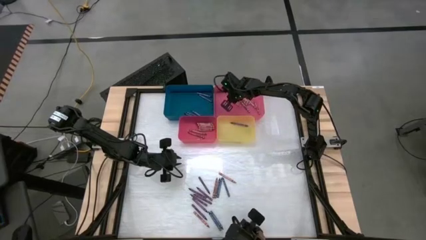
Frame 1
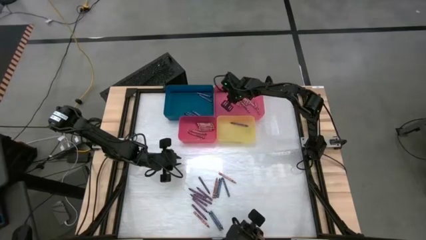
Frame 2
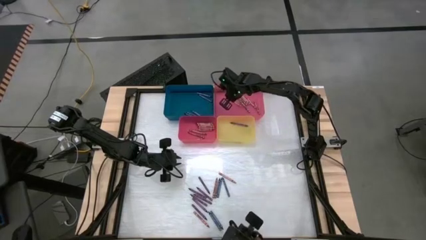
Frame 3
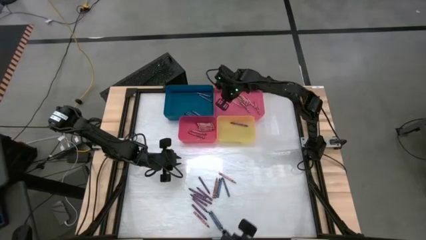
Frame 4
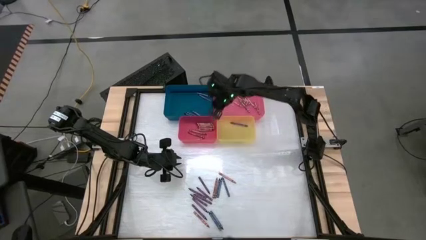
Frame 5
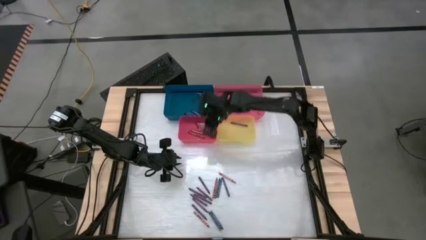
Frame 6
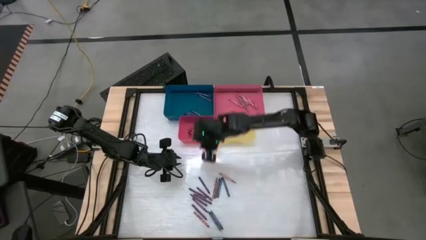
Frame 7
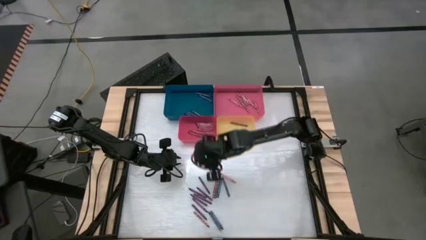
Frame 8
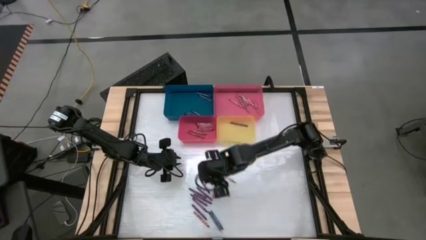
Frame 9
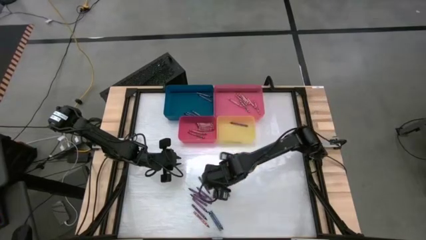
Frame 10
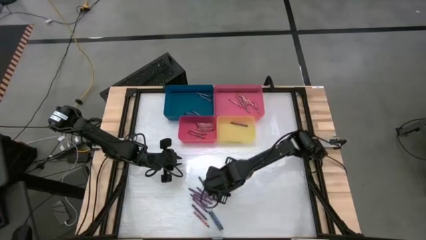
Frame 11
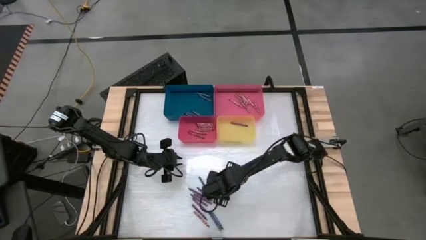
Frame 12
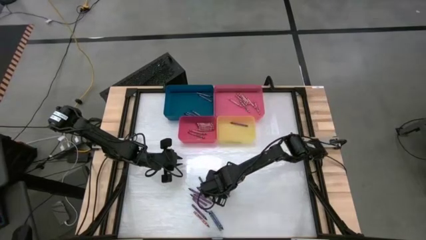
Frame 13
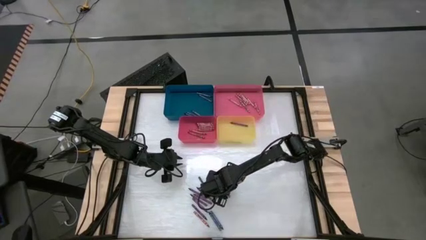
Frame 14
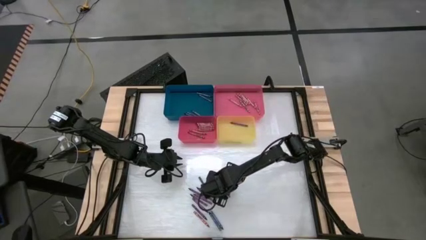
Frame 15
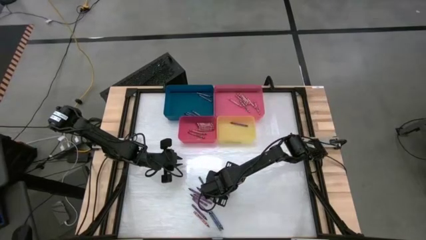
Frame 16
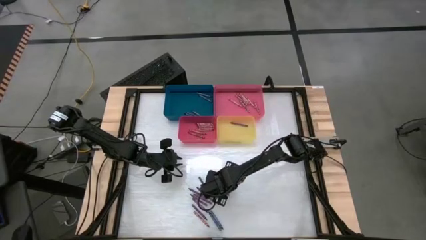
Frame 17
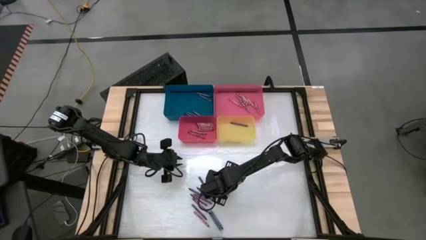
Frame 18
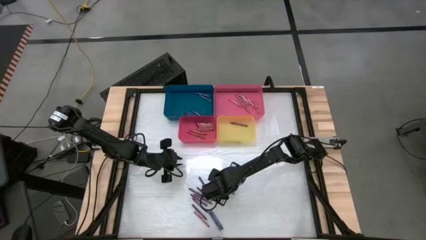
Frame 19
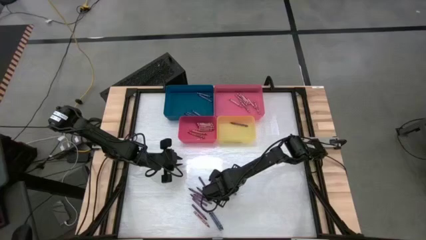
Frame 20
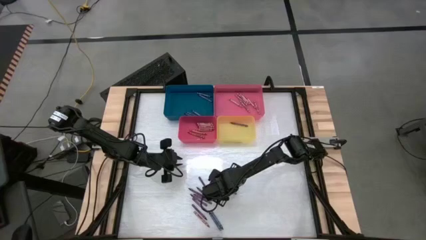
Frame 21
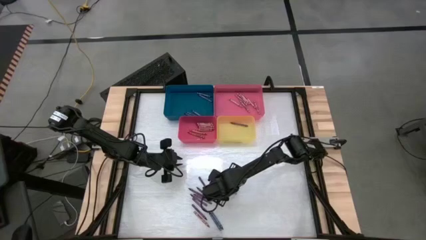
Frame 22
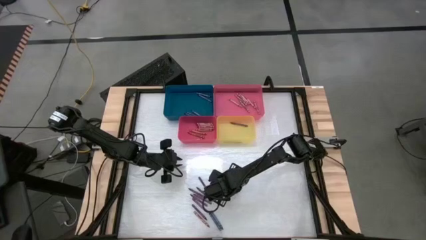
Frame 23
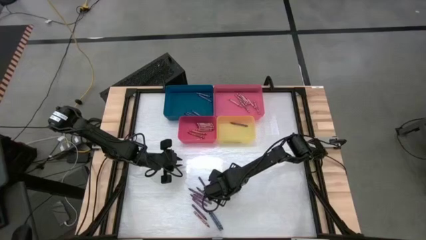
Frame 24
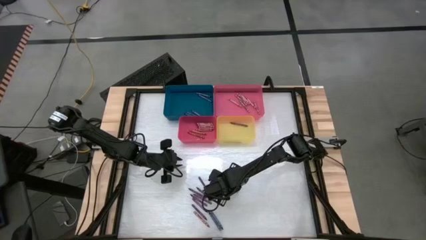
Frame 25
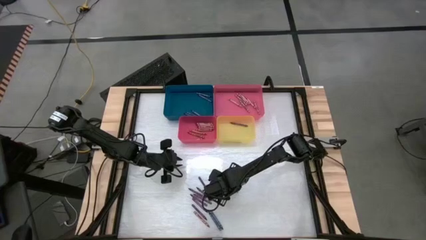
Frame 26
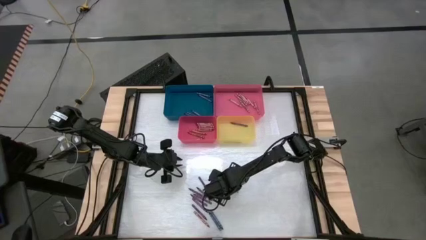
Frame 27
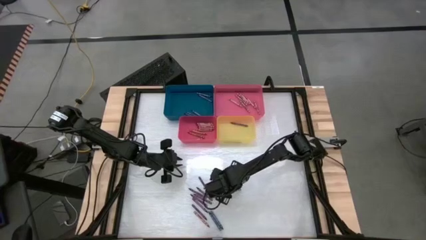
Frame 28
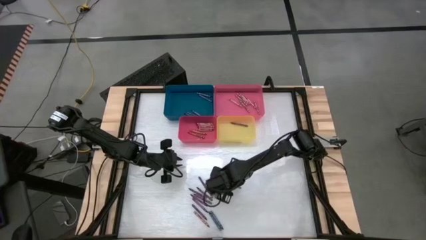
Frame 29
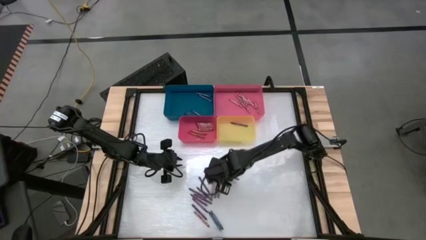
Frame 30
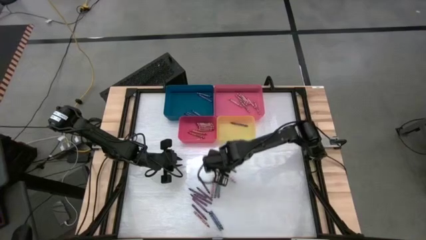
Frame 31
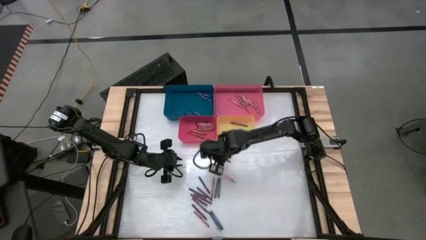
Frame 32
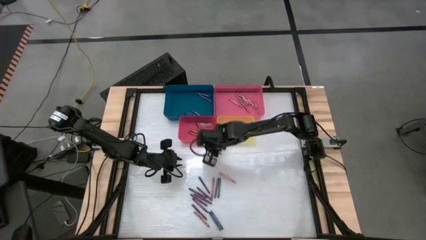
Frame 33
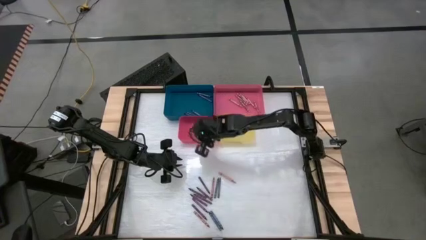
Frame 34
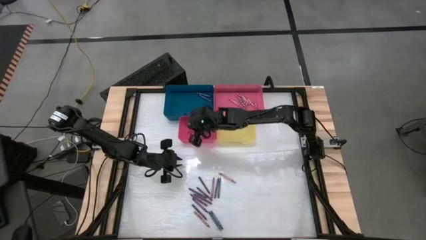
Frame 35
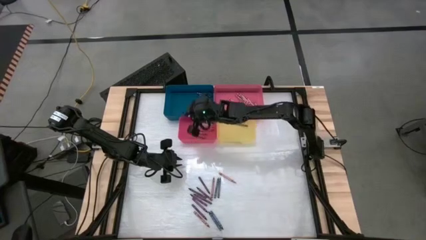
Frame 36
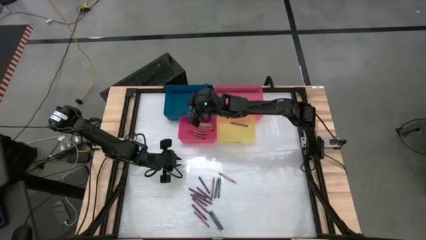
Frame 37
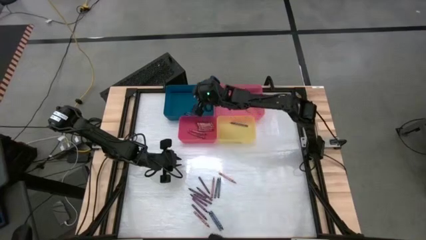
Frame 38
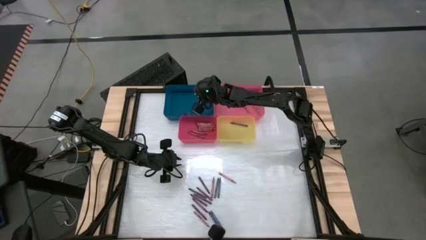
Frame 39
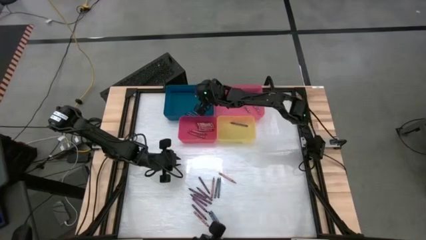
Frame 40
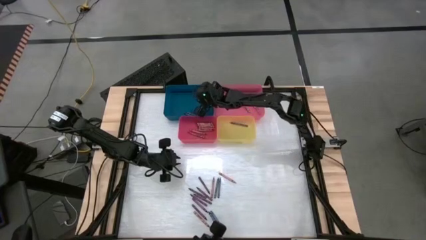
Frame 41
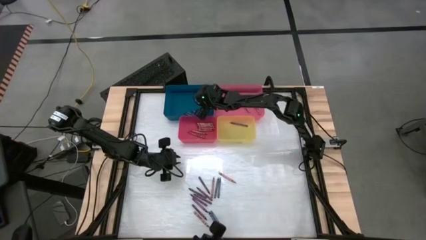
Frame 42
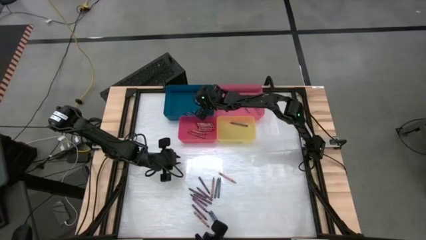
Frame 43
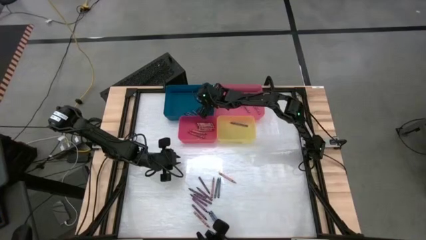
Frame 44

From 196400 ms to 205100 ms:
Task: Sort crayons
Put the blue crayon into the blue bin

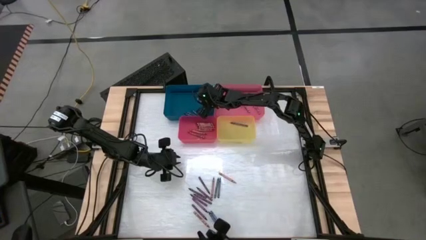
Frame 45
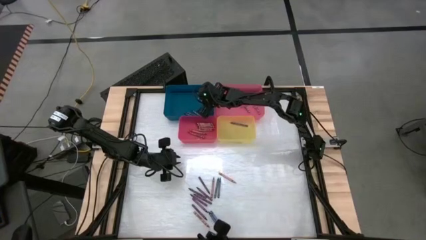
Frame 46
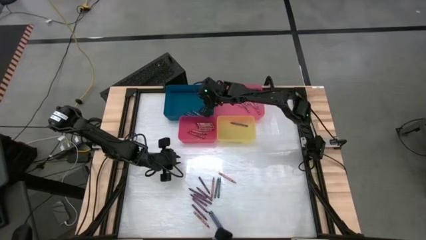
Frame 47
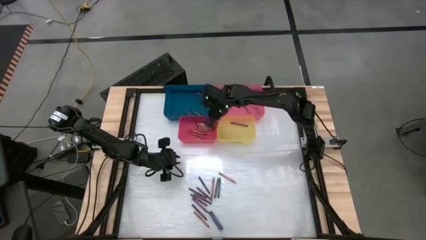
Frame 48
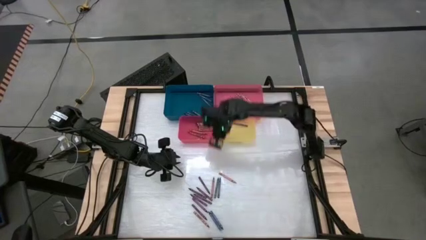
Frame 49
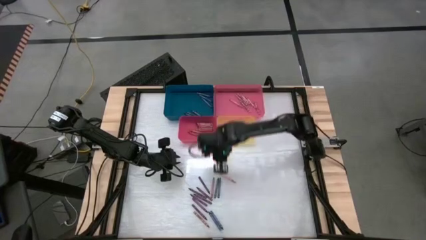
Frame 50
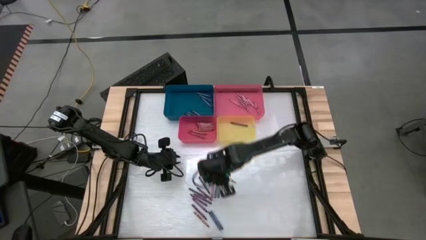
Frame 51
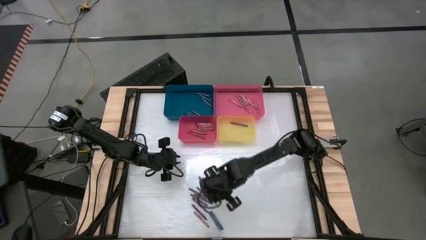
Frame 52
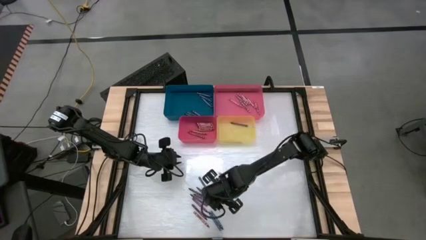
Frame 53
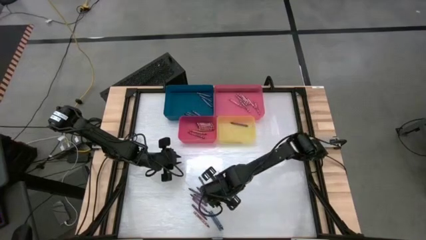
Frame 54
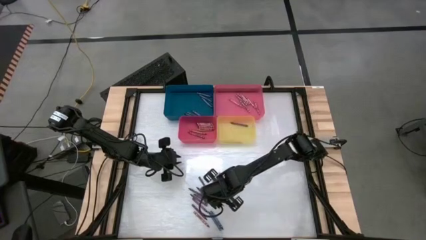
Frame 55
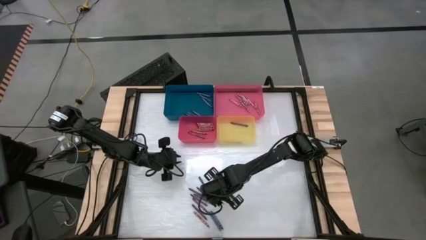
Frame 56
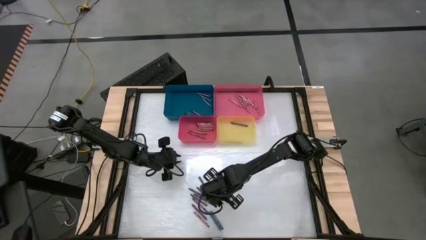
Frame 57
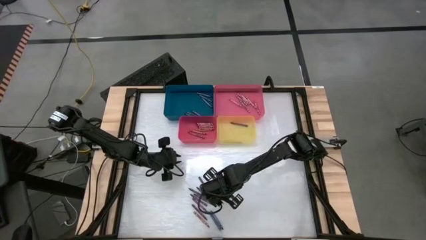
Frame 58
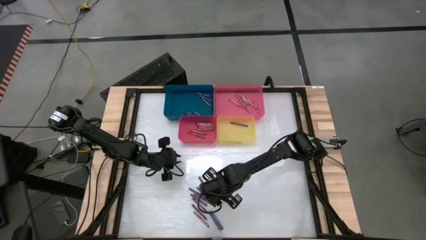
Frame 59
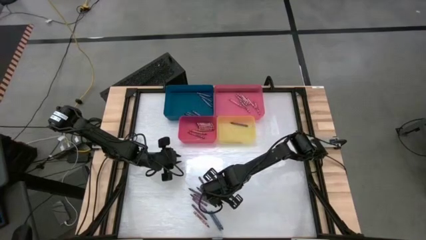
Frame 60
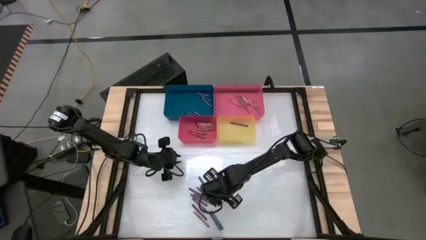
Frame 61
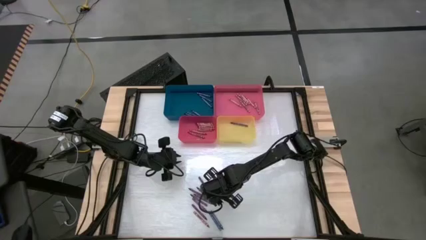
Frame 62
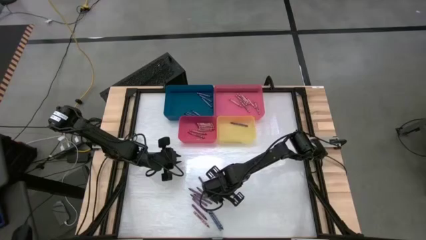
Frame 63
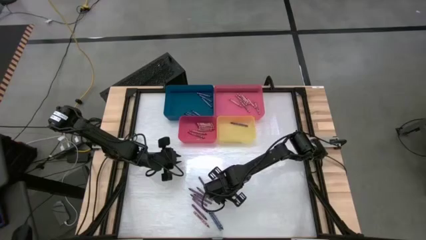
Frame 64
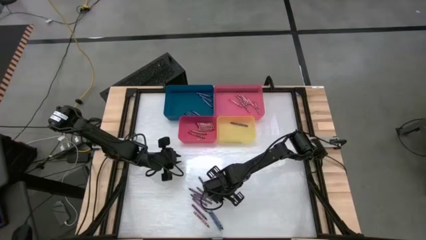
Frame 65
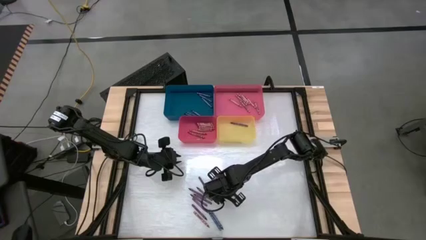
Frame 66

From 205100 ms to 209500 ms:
Put the blue crayon into the blue bin
